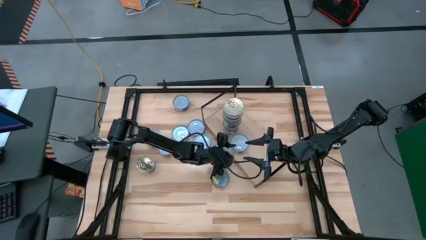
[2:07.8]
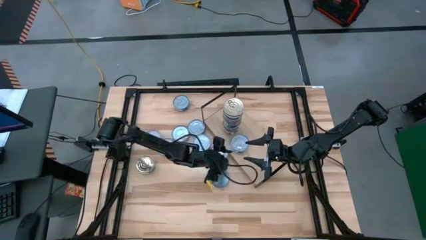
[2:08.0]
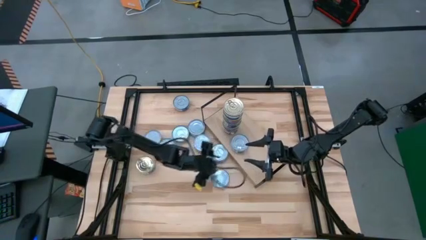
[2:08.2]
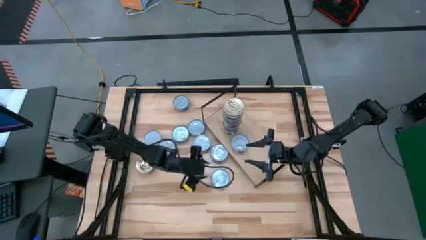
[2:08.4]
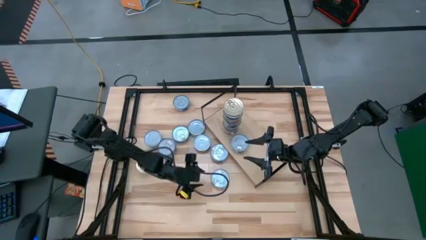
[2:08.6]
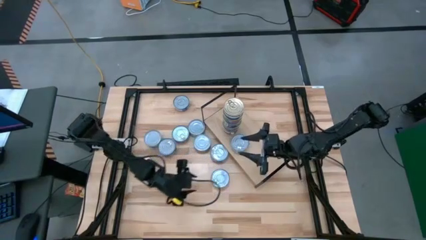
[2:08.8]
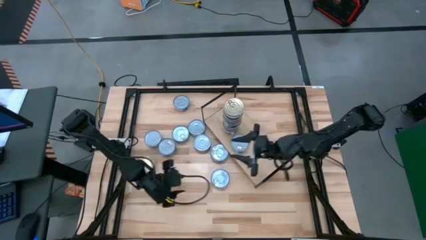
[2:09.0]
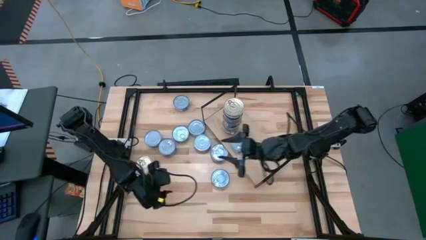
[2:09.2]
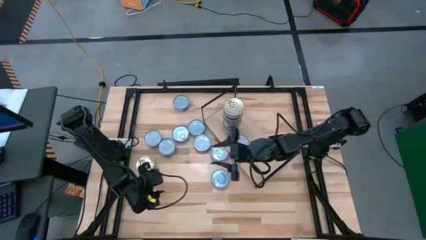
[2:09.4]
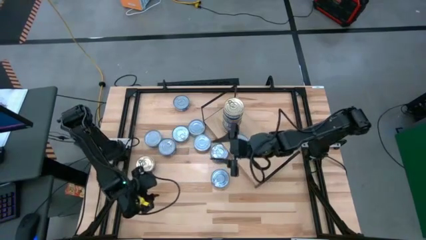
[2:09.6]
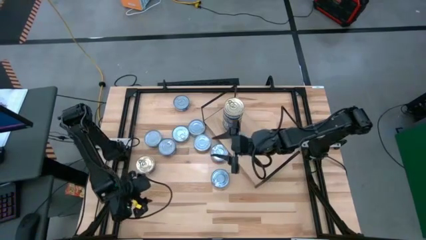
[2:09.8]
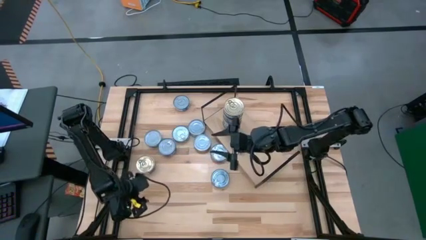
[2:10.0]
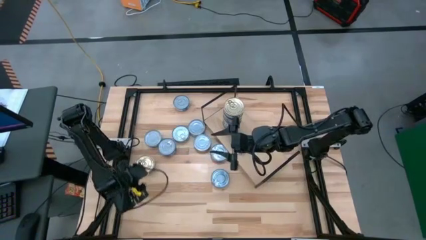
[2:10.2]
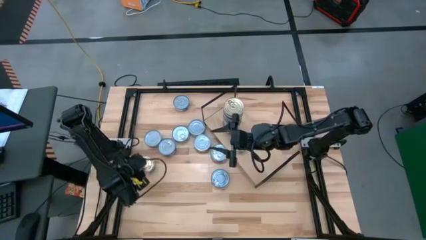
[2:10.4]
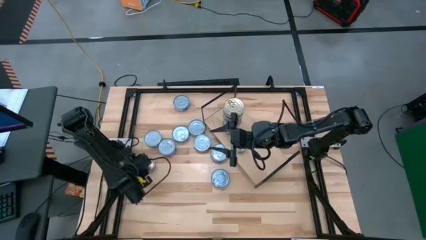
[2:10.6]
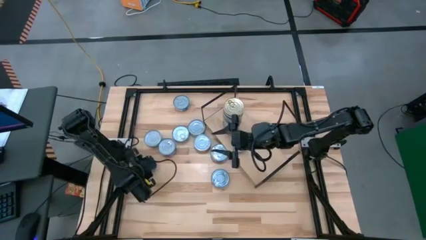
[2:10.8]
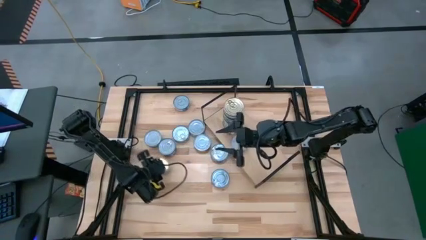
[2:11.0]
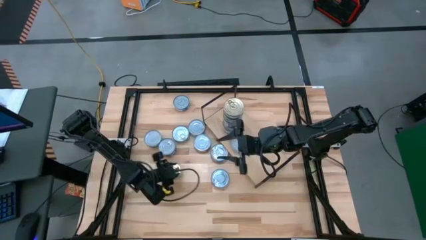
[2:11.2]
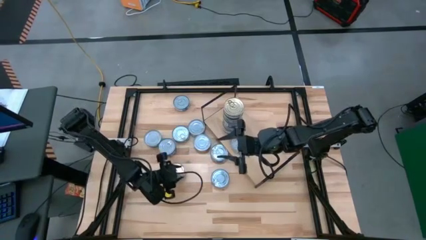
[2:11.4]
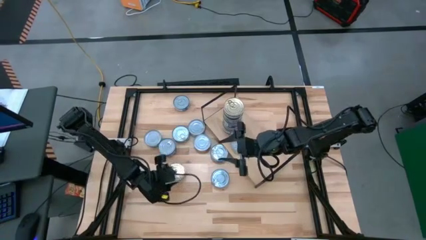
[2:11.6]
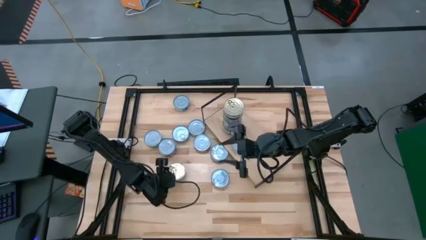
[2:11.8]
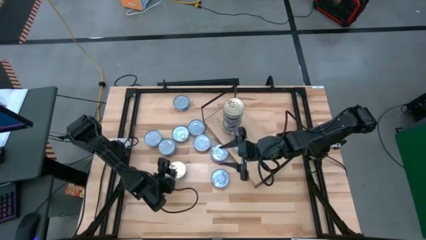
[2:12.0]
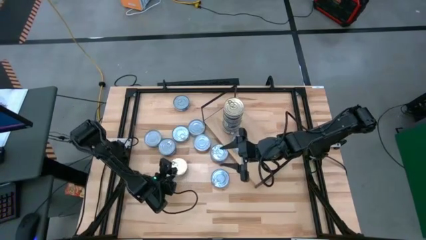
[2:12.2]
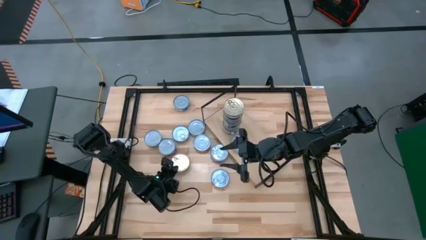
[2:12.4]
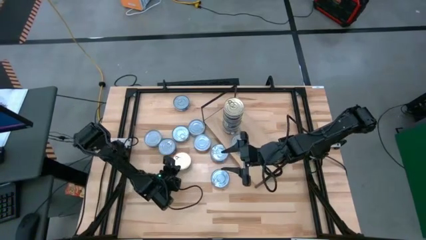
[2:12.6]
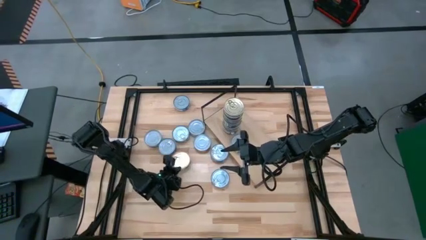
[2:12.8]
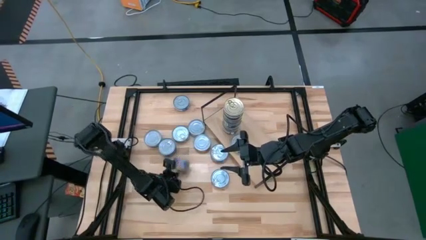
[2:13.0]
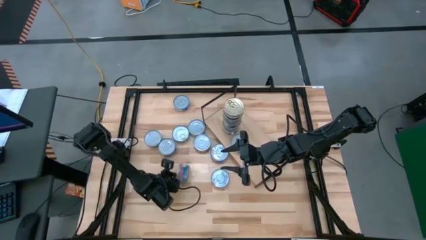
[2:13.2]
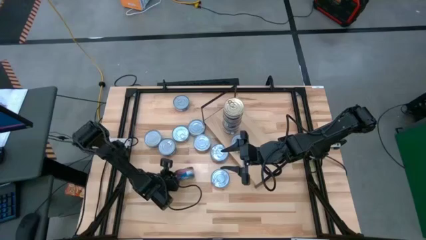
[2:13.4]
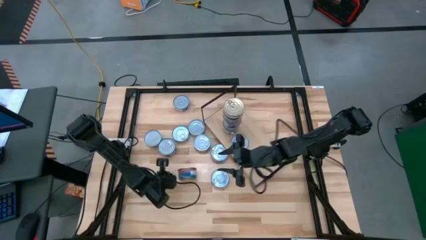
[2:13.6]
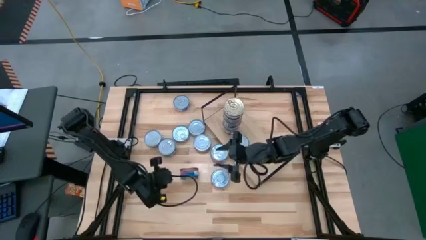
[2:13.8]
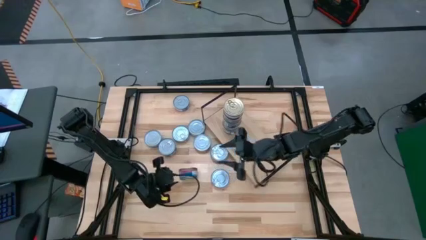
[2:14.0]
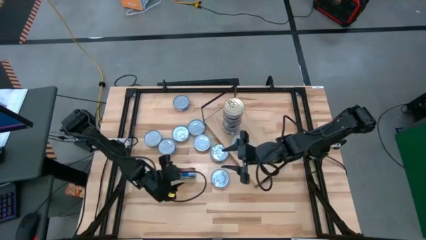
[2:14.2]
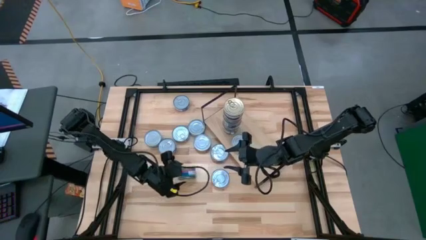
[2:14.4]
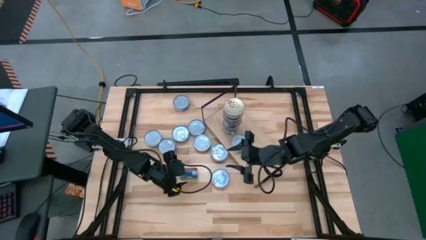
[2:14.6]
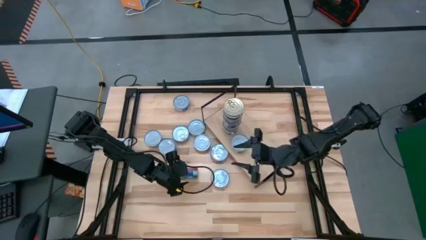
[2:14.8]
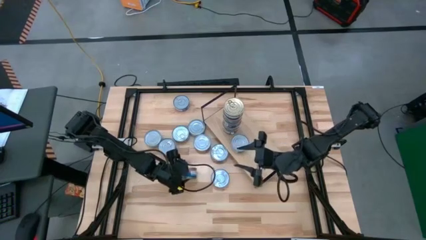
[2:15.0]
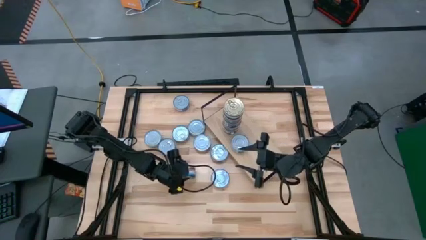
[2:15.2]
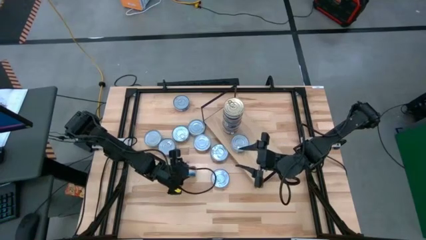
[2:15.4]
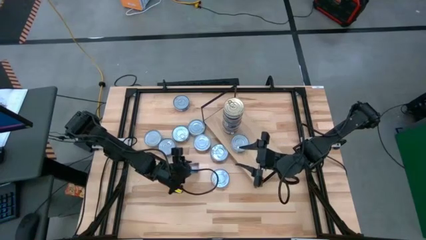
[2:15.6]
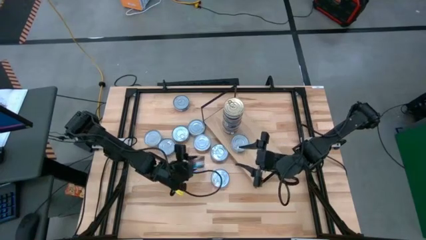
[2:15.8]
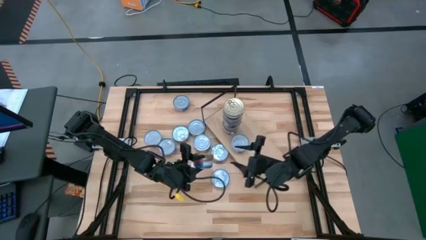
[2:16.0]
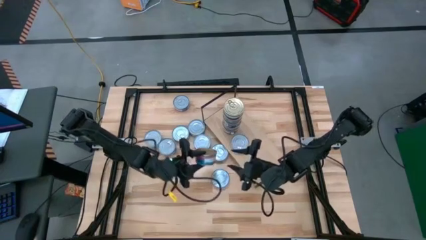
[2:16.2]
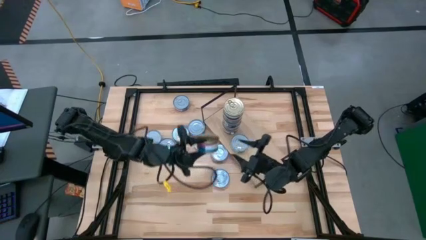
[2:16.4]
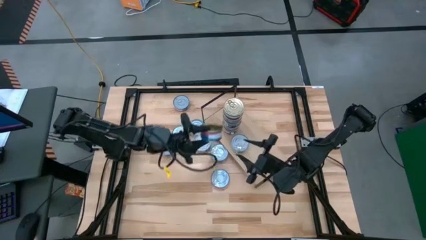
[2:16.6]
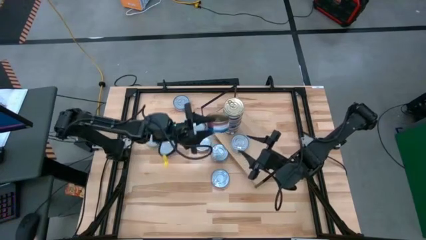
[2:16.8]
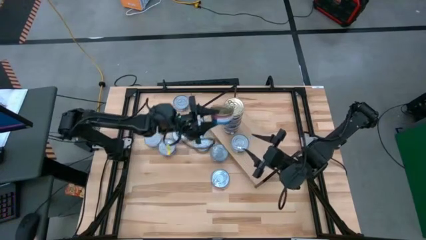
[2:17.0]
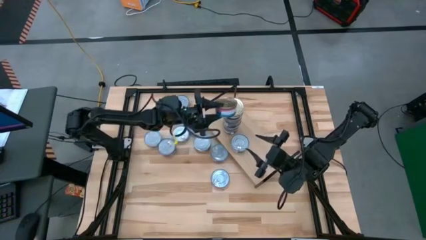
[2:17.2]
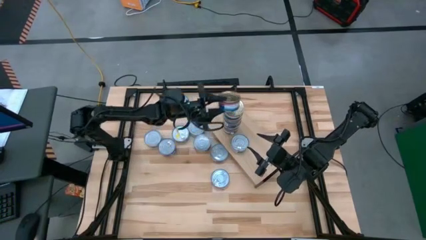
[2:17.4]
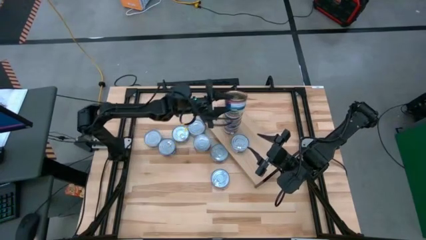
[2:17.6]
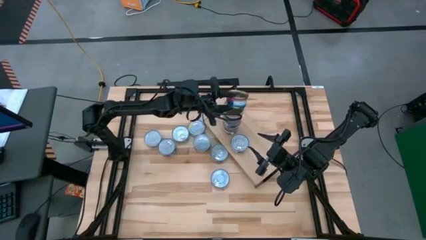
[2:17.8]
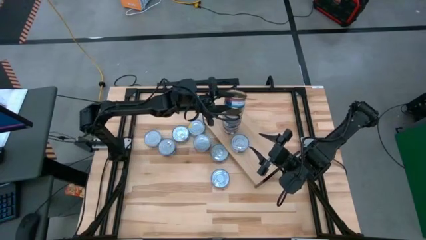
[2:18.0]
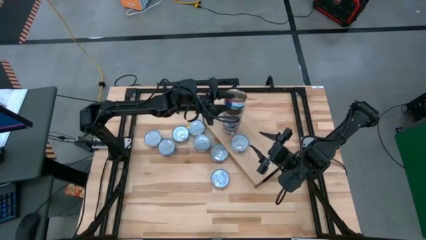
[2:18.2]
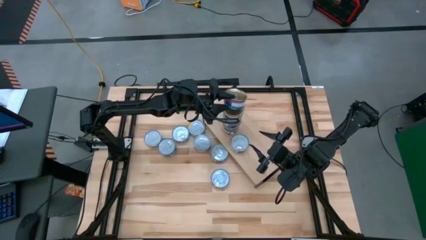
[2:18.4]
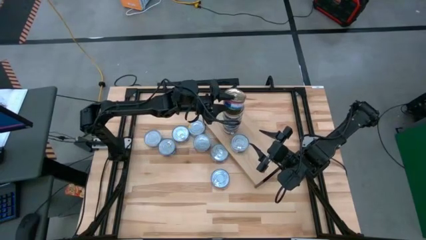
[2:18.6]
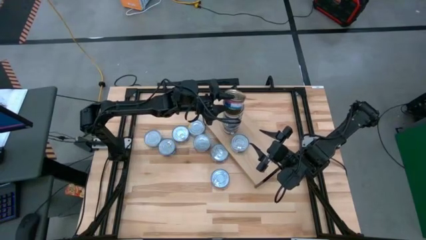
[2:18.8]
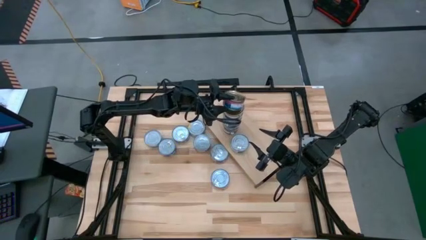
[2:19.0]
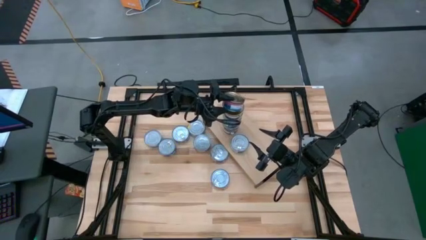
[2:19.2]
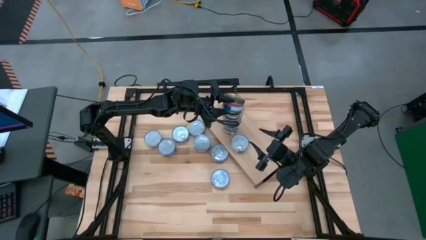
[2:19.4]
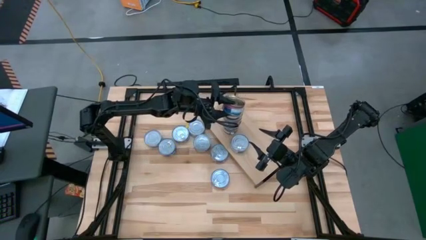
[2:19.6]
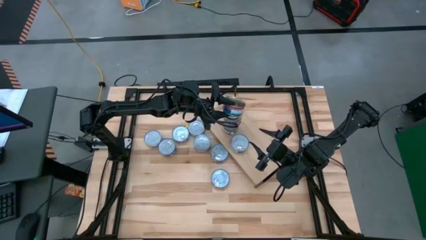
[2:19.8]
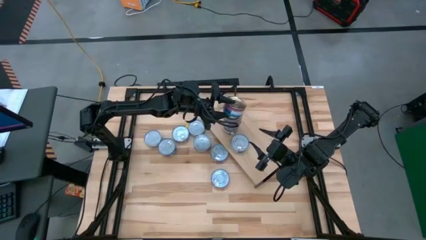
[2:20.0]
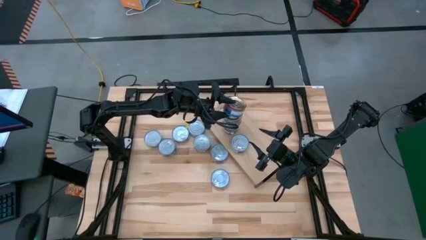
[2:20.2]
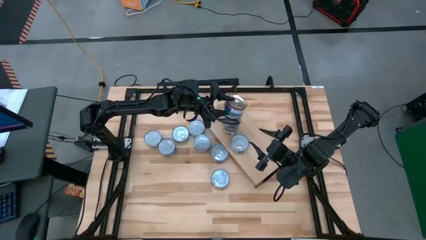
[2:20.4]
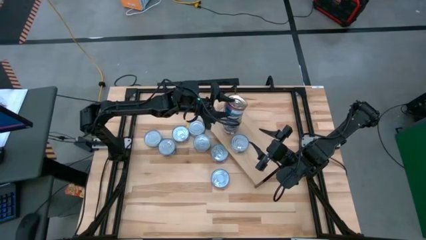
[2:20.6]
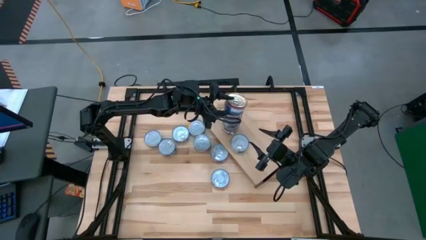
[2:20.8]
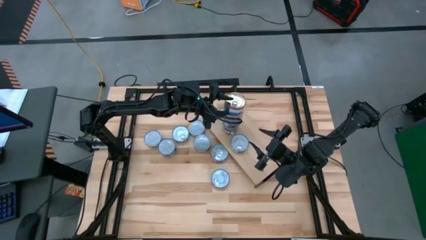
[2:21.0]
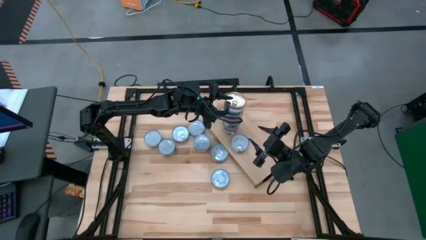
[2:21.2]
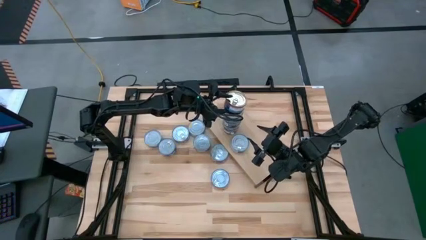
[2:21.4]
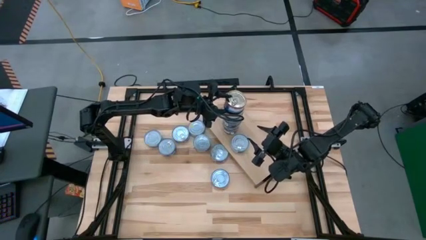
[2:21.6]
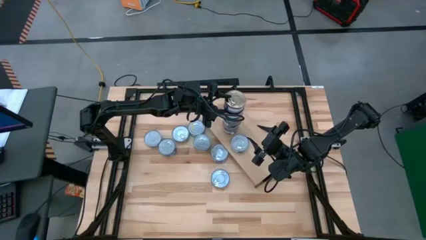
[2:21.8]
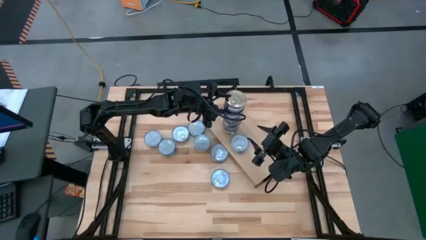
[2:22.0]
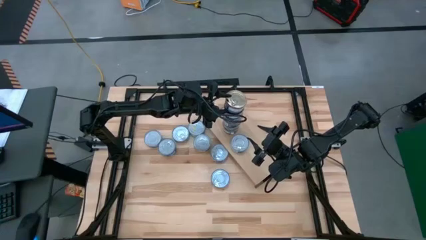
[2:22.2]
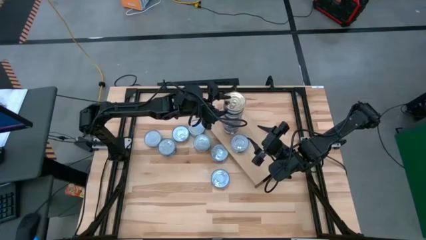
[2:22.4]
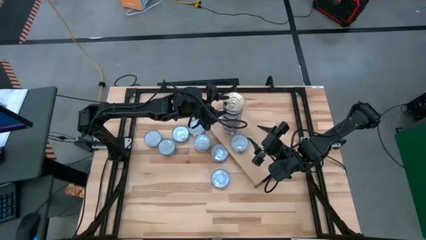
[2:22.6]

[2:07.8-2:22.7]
Task: Stack canned seafood by type on shelf
Stack the blue tuna can on top of the blue tuna can on the shelf
